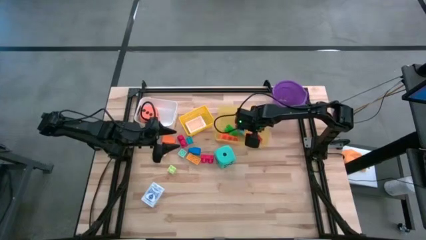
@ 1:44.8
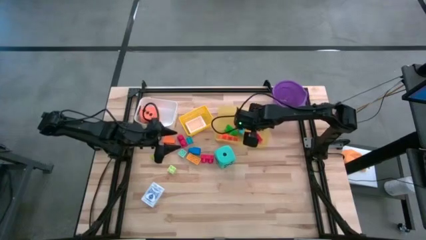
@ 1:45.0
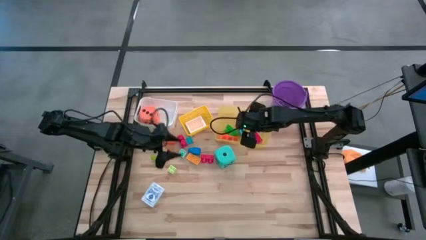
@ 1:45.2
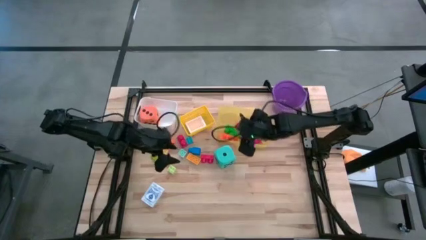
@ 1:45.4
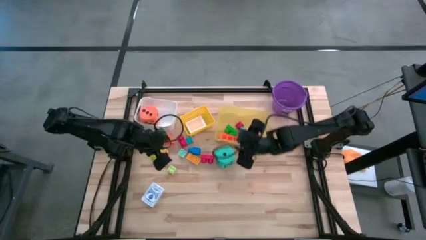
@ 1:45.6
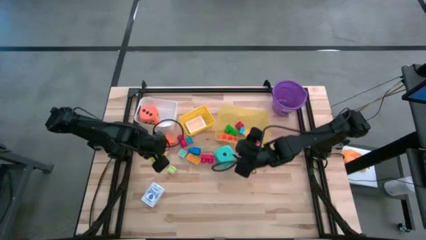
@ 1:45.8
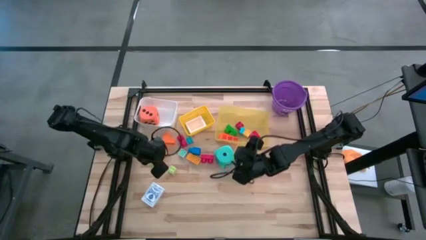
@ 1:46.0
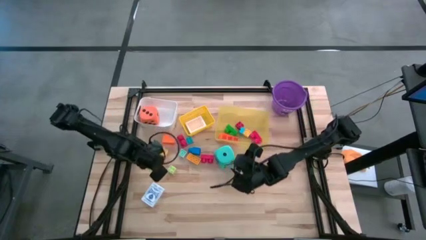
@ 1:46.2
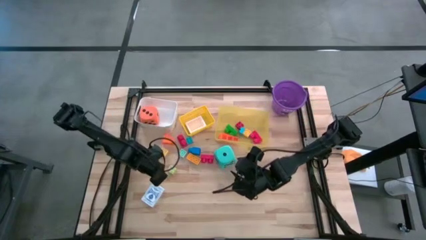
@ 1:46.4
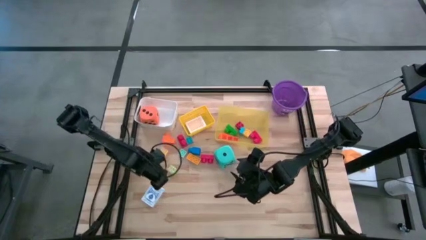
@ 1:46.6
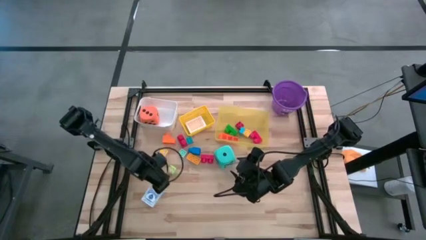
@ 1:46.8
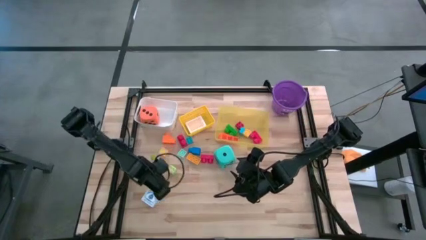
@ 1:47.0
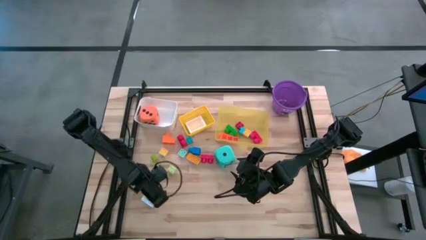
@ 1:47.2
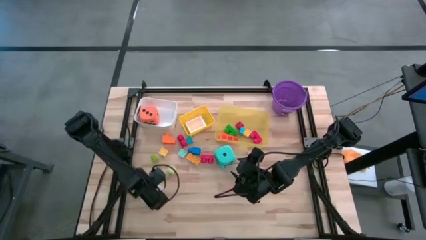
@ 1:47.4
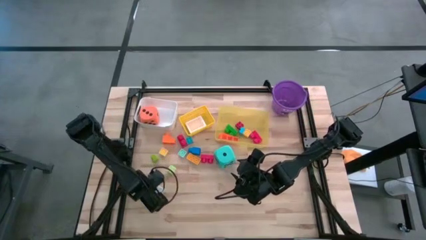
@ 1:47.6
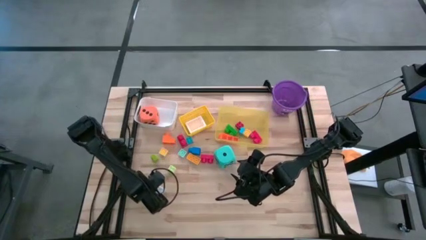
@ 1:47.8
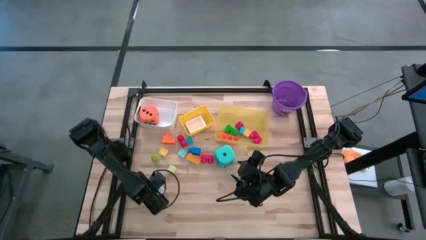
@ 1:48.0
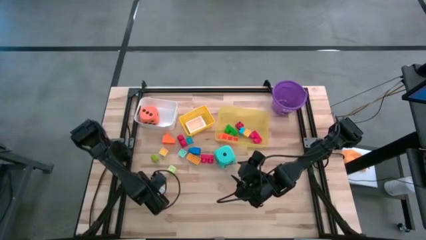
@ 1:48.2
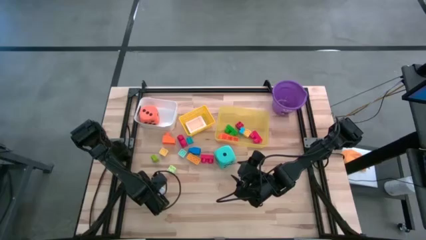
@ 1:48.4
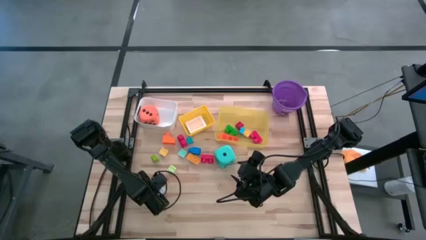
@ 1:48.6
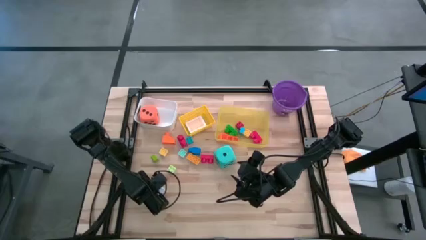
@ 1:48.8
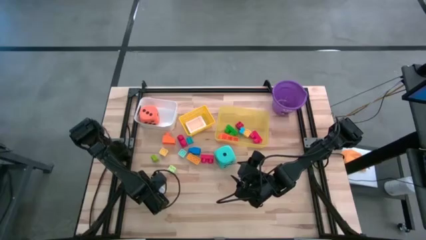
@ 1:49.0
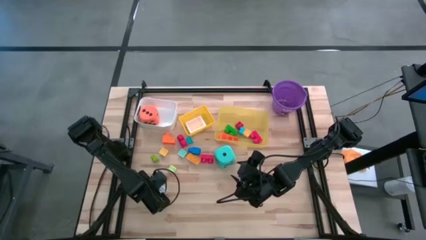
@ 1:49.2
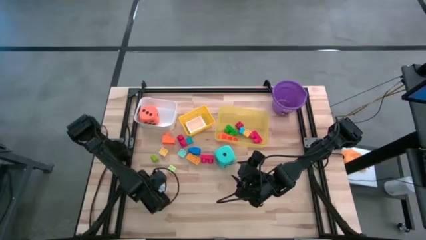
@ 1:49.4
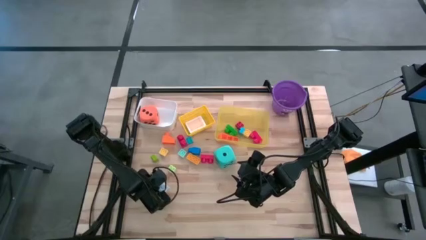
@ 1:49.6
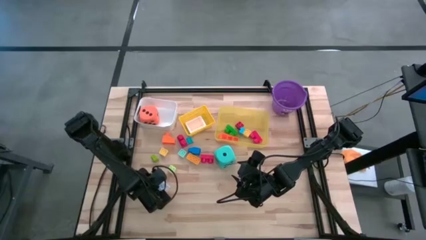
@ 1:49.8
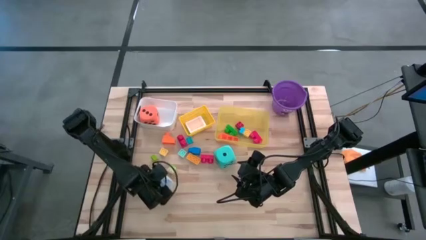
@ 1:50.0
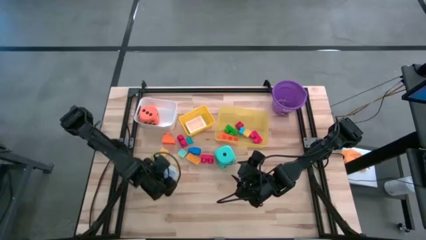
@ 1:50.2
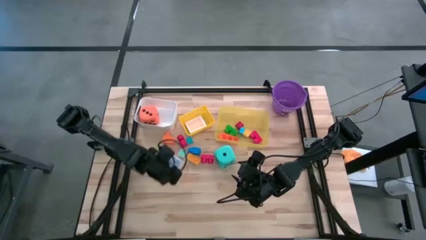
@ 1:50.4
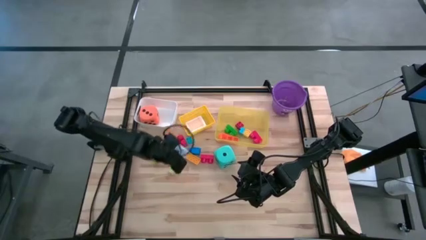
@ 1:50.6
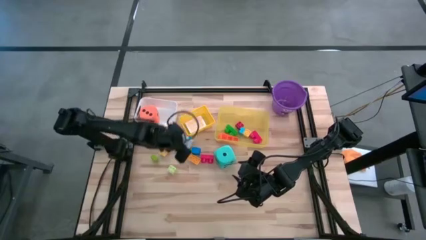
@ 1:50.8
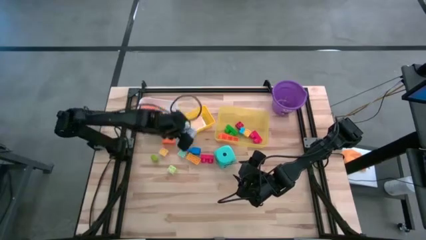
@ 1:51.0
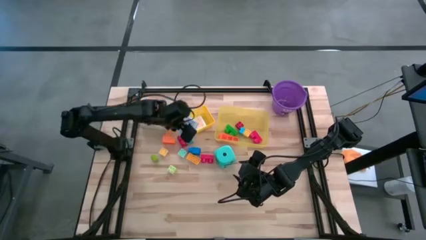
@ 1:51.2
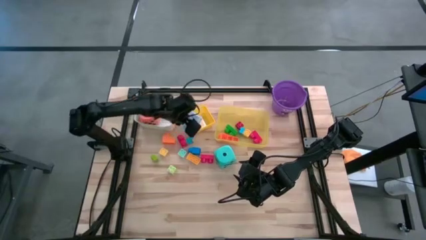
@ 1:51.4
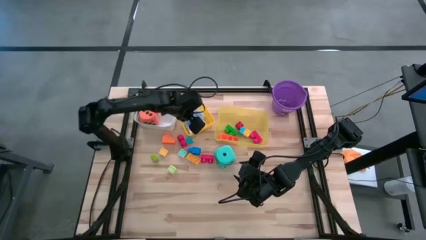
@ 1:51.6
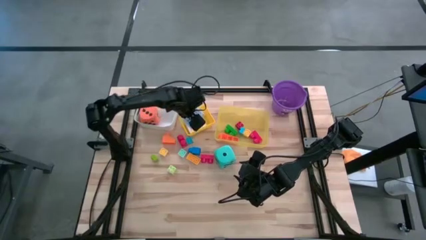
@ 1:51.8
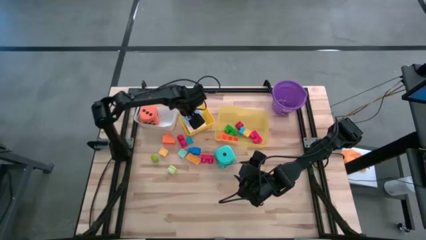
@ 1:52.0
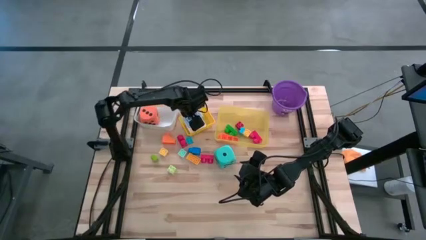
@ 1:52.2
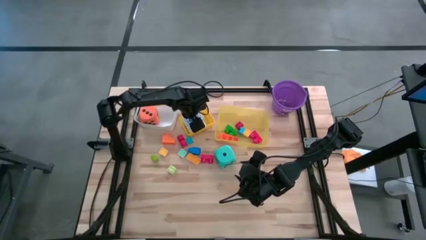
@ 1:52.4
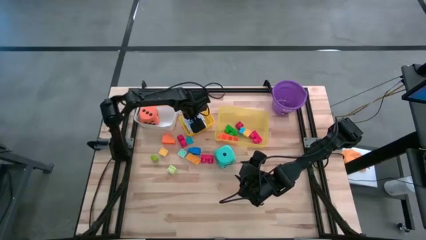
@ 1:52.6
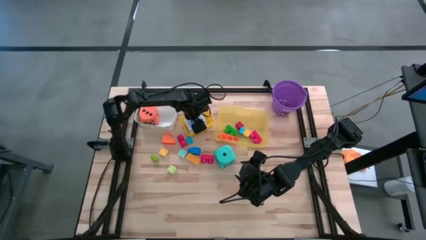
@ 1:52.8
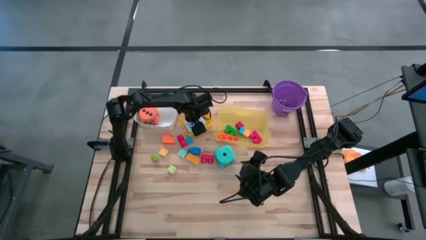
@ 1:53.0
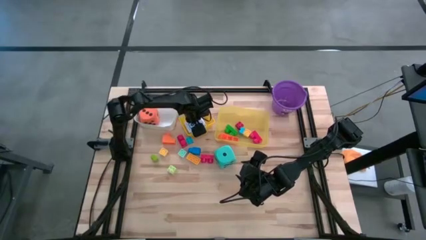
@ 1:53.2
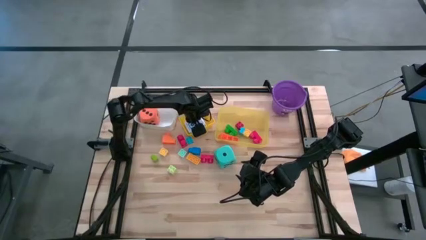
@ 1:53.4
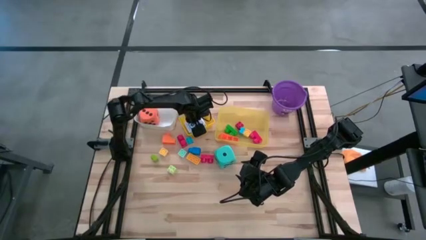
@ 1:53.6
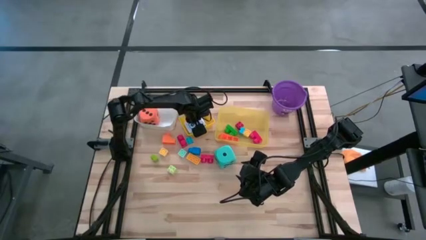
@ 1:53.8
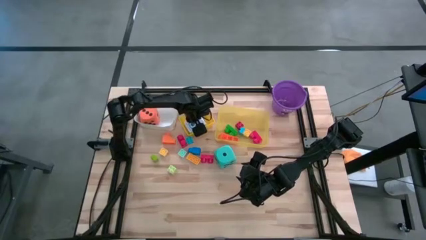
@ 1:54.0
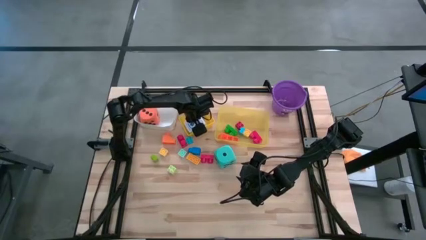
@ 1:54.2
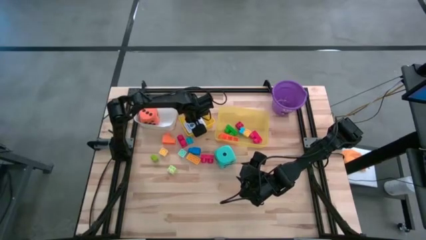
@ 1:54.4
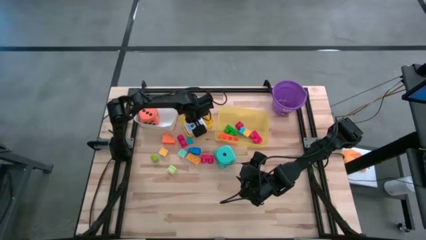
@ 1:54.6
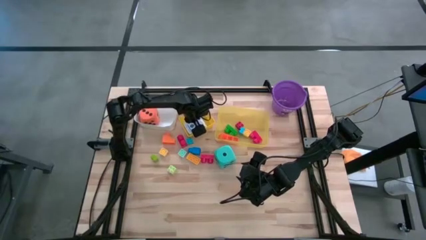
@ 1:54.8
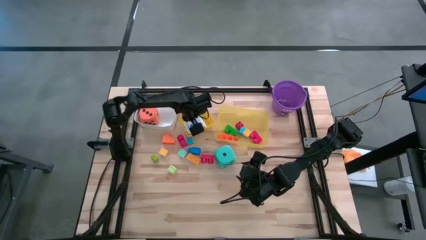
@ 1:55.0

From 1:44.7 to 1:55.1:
Task: Pick & Place Toys
Put the blue deck of cards into the yellow basket

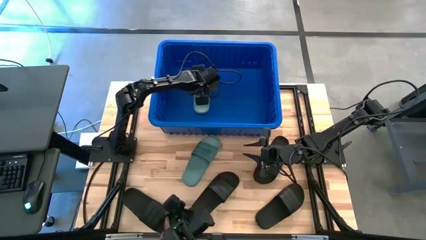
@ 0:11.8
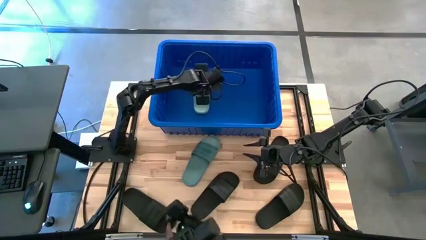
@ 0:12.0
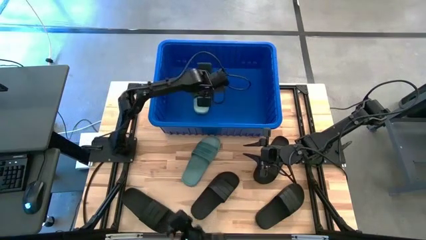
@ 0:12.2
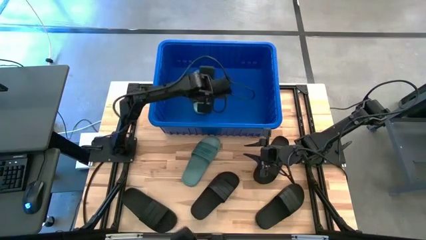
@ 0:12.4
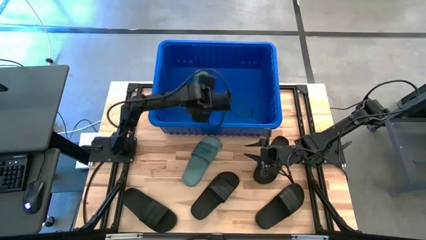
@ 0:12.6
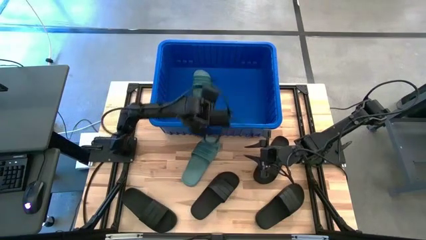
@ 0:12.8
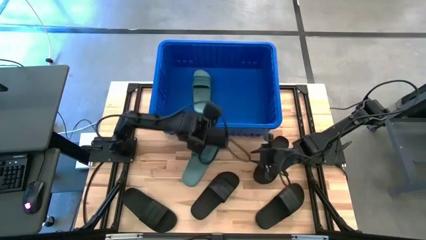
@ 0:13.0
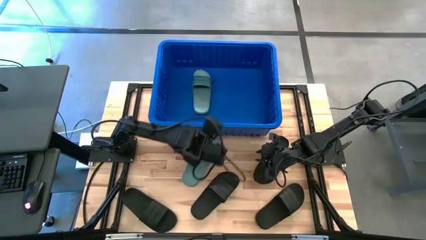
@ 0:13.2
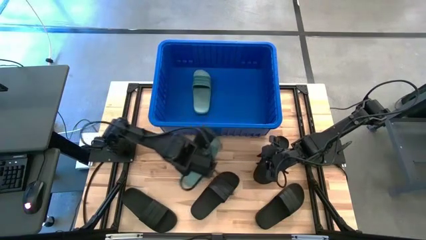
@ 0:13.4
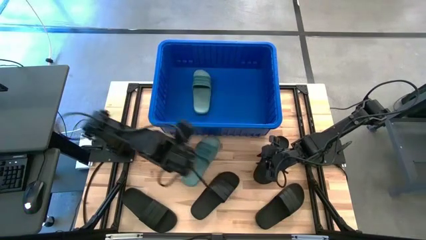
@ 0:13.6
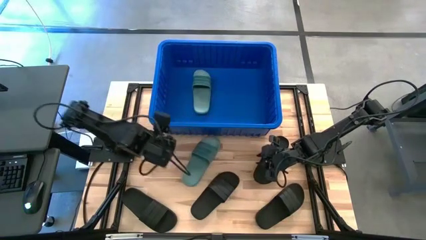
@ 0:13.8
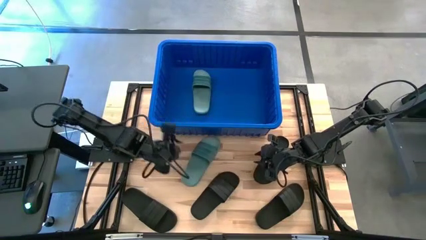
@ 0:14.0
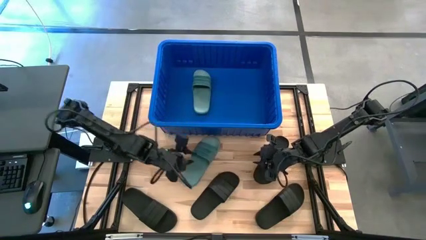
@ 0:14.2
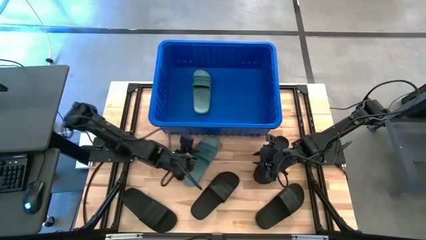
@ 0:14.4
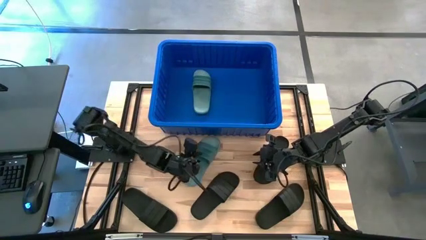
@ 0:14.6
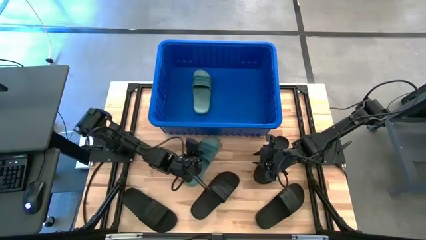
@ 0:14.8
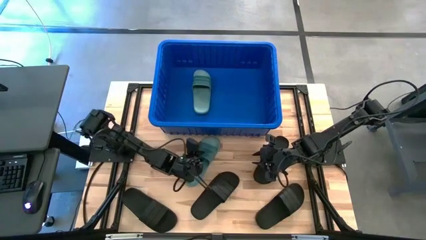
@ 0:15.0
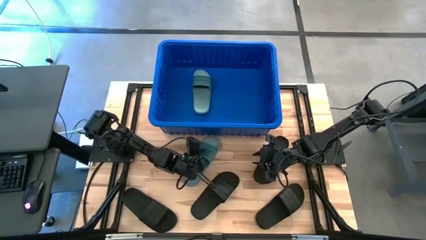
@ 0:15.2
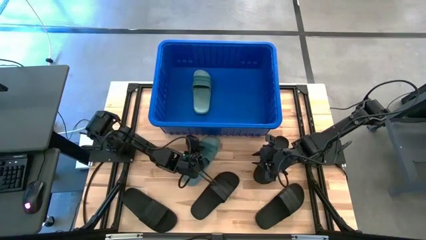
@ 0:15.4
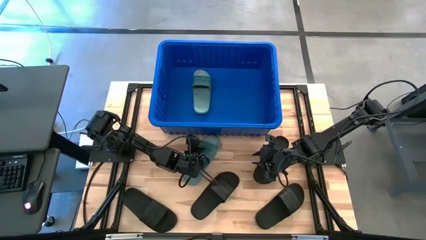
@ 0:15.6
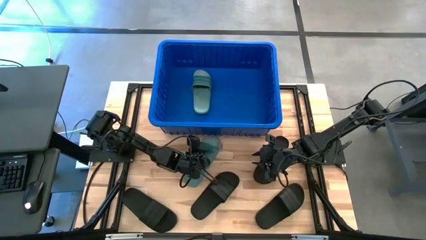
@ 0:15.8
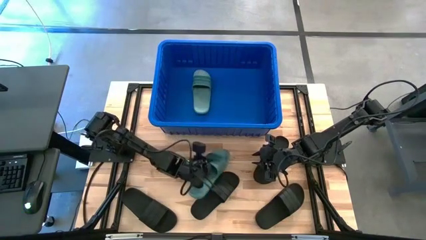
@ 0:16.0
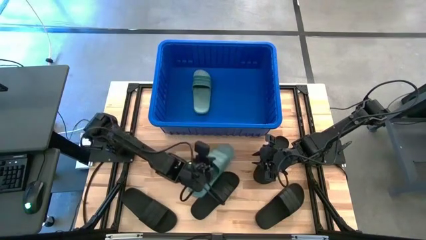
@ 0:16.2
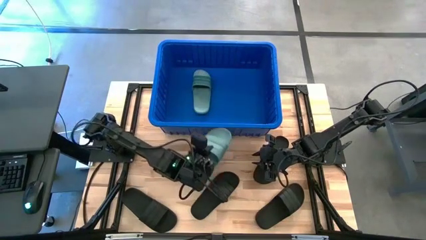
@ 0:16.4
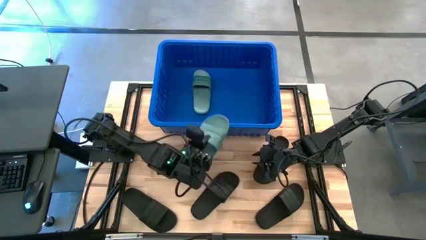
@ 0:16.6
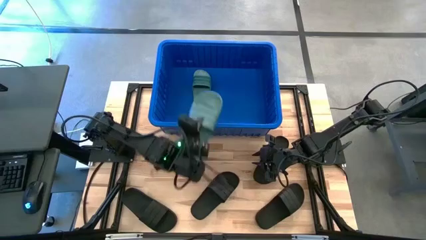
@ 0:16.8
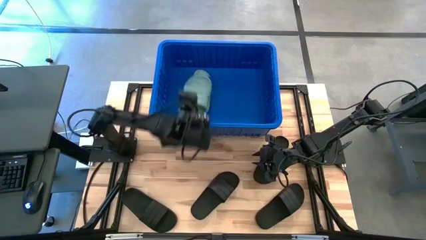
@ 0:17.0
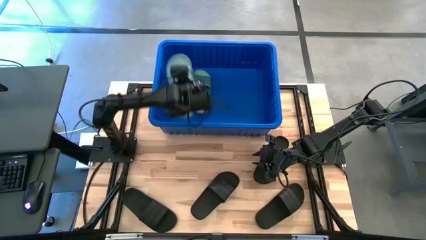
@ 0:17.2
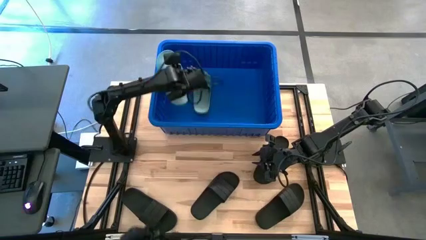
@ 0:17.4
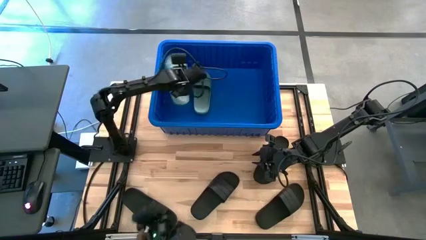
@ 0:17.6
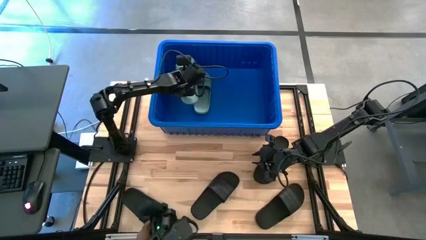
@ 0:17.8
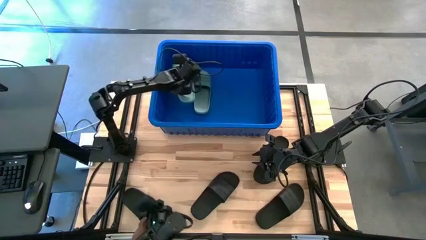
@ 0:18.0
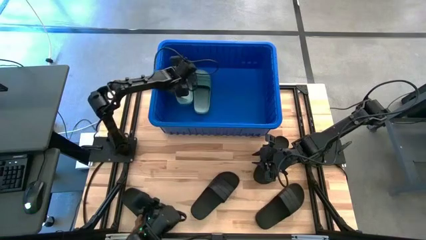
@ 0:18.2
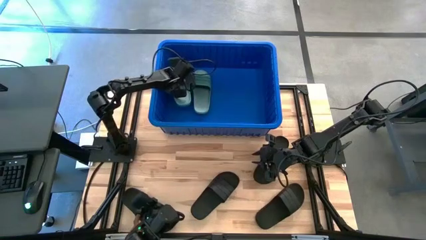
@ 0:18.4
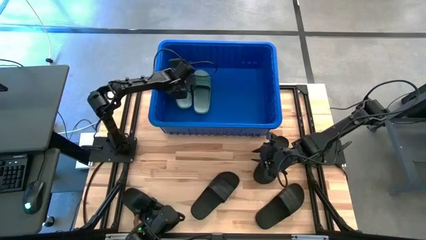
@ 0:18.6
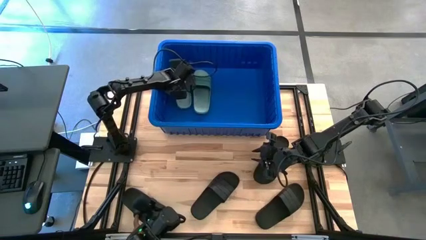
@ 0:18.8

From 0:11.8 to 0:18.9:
Task: Pick and place slides into bin
Put the green slide into the blue bin
